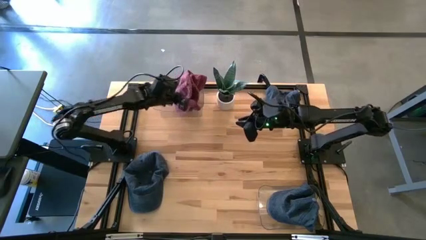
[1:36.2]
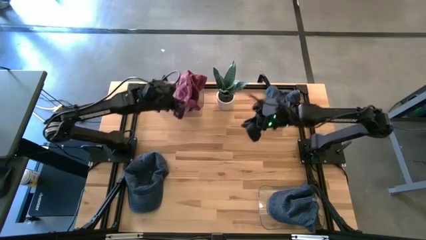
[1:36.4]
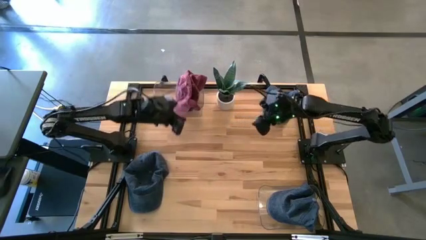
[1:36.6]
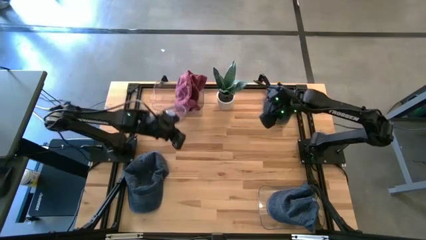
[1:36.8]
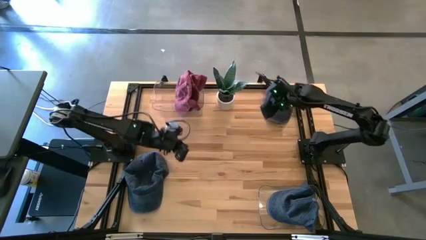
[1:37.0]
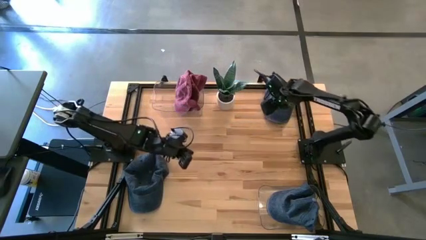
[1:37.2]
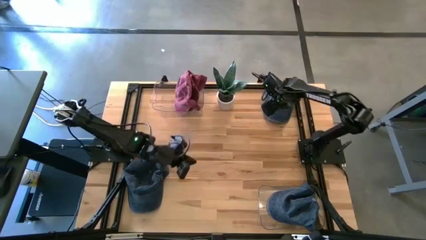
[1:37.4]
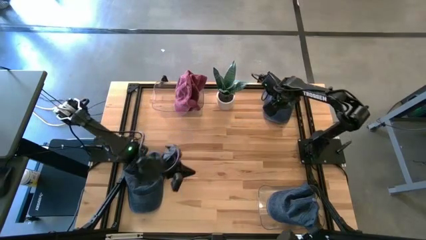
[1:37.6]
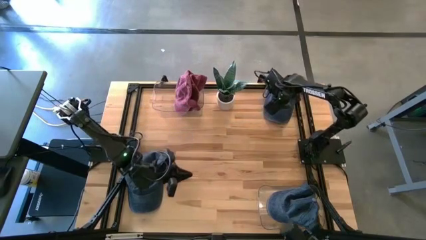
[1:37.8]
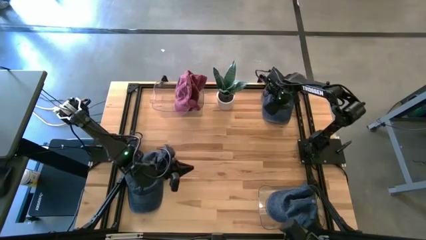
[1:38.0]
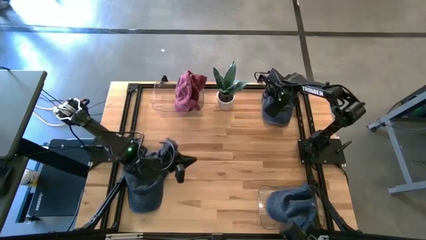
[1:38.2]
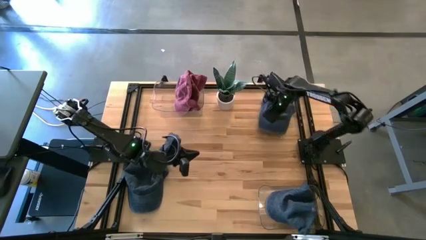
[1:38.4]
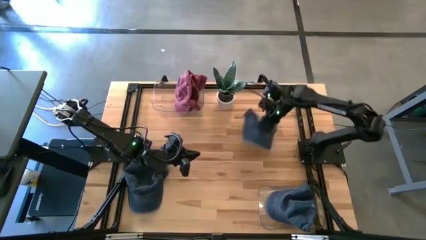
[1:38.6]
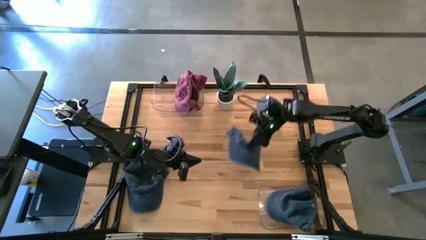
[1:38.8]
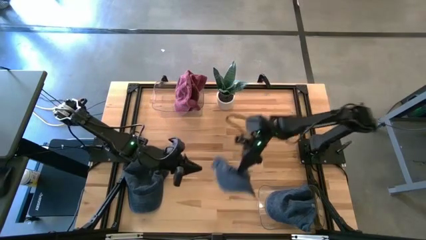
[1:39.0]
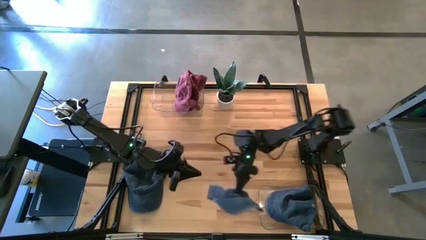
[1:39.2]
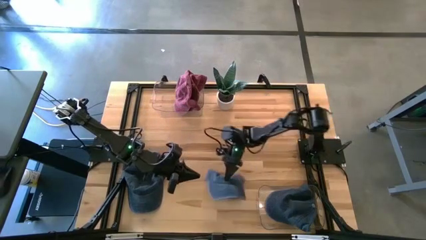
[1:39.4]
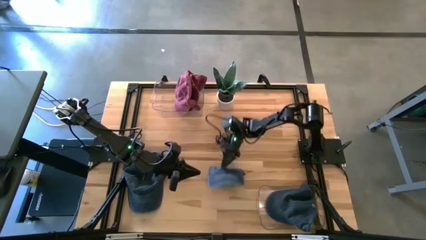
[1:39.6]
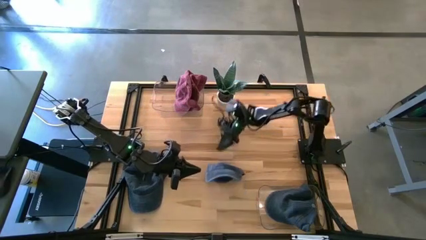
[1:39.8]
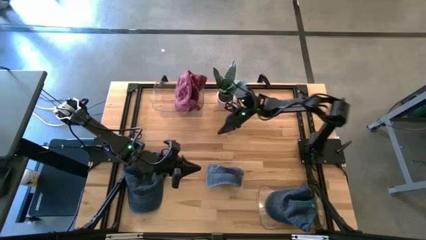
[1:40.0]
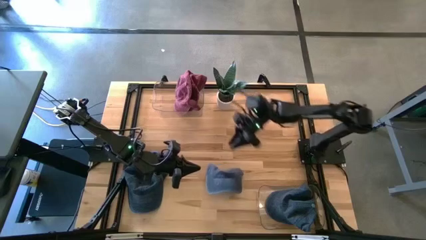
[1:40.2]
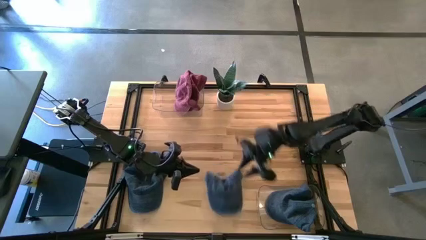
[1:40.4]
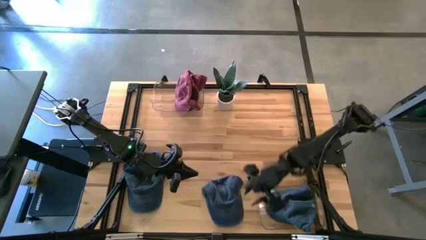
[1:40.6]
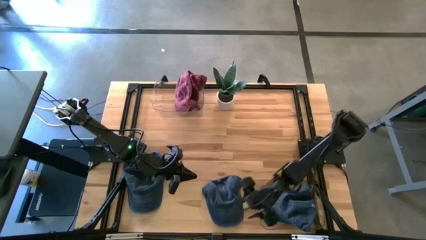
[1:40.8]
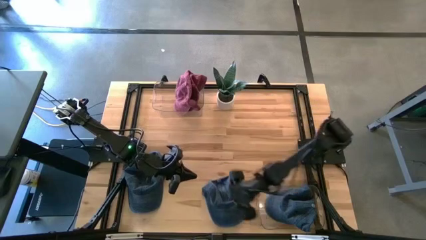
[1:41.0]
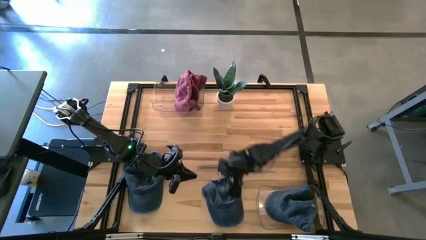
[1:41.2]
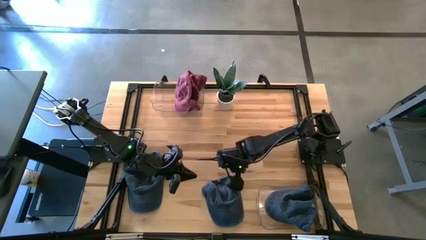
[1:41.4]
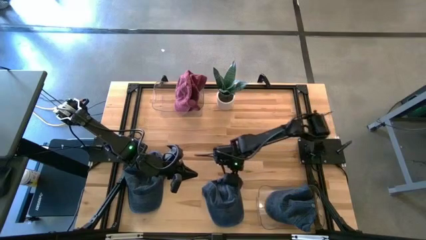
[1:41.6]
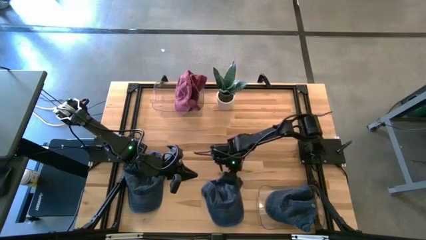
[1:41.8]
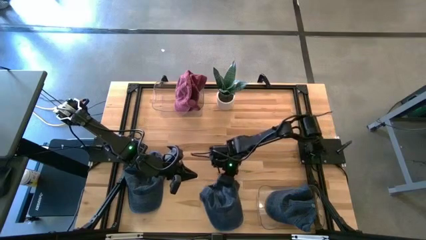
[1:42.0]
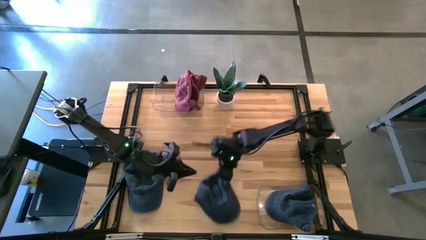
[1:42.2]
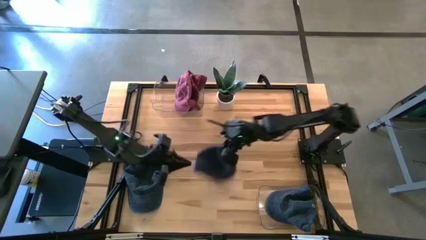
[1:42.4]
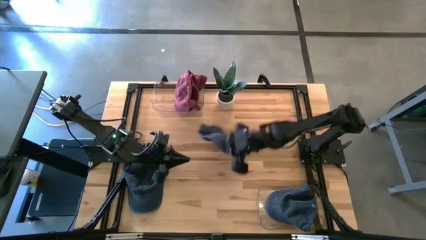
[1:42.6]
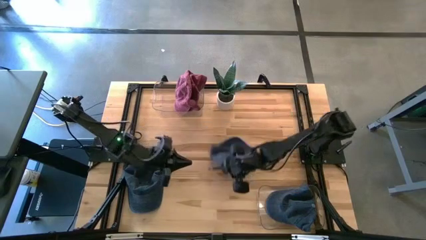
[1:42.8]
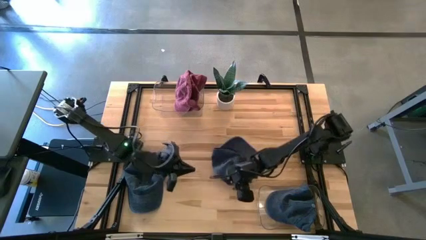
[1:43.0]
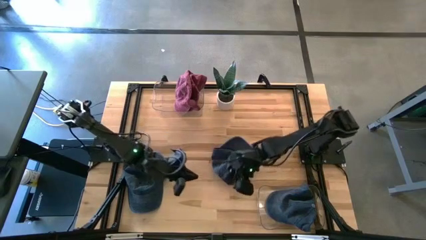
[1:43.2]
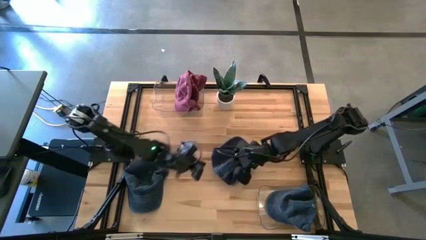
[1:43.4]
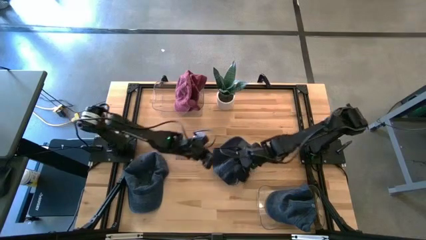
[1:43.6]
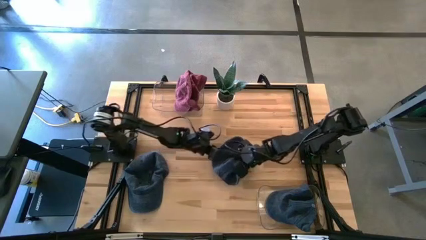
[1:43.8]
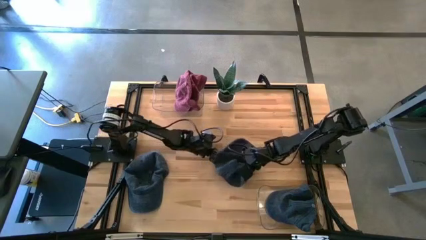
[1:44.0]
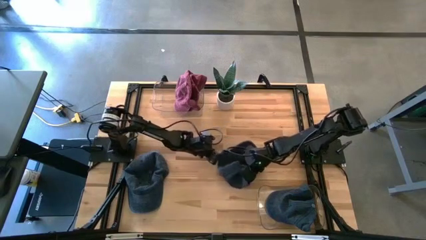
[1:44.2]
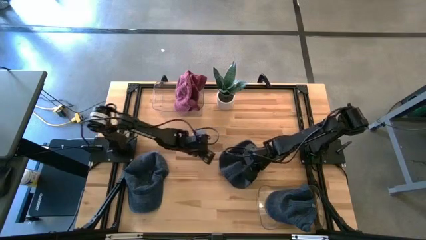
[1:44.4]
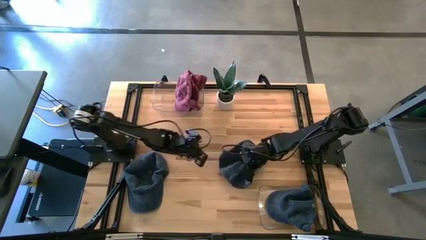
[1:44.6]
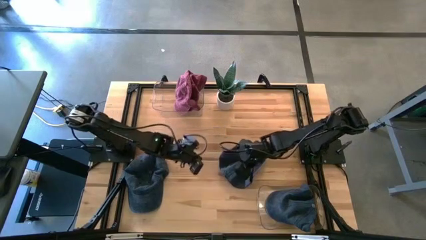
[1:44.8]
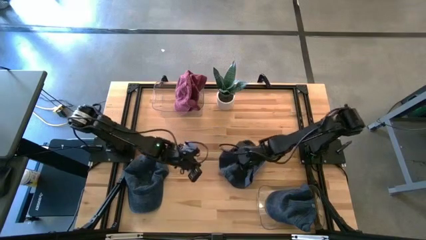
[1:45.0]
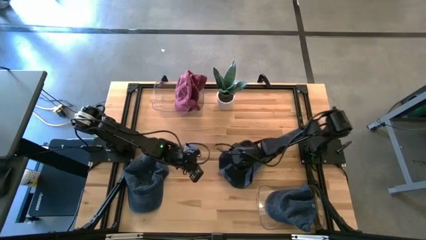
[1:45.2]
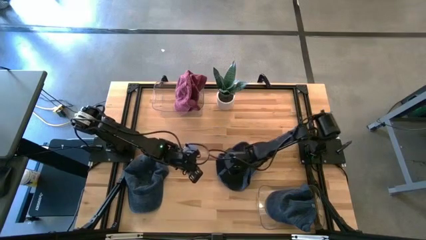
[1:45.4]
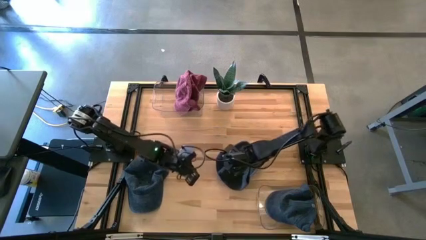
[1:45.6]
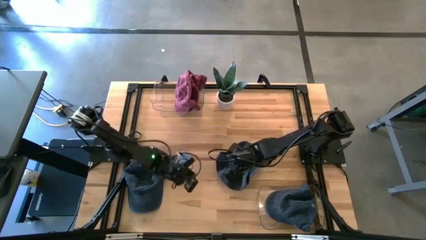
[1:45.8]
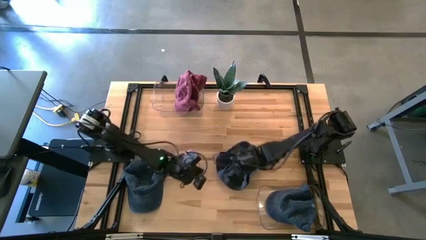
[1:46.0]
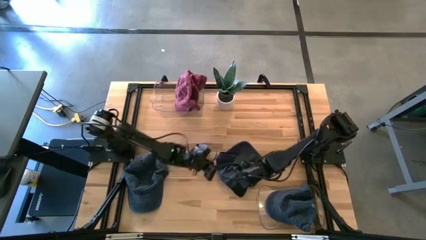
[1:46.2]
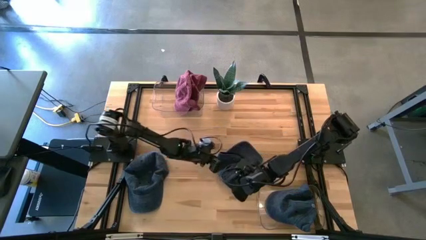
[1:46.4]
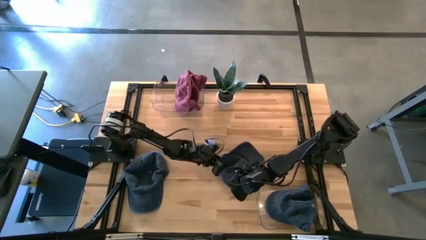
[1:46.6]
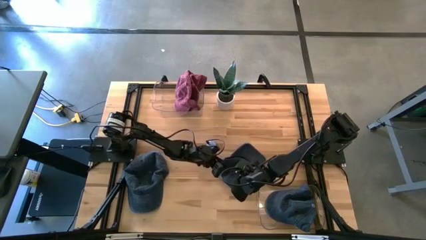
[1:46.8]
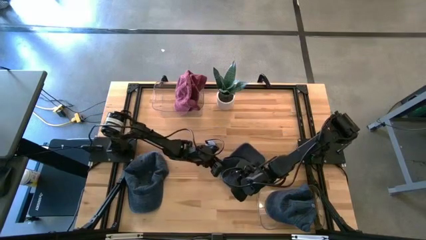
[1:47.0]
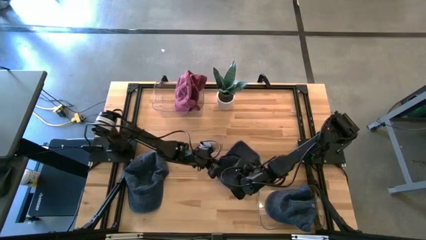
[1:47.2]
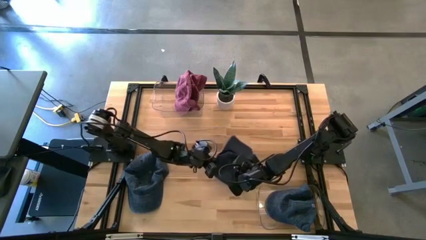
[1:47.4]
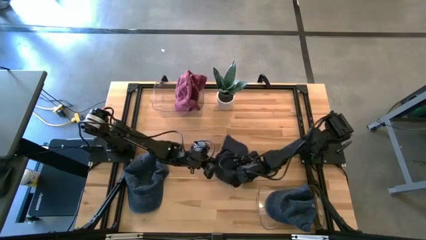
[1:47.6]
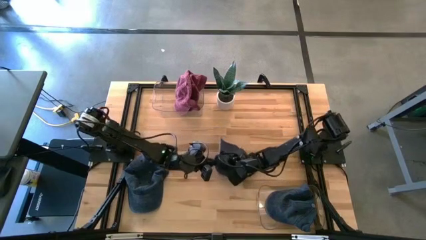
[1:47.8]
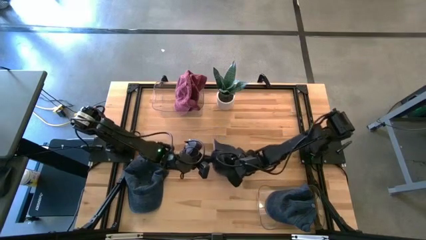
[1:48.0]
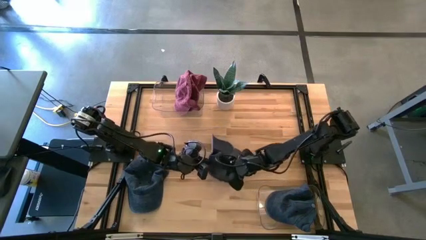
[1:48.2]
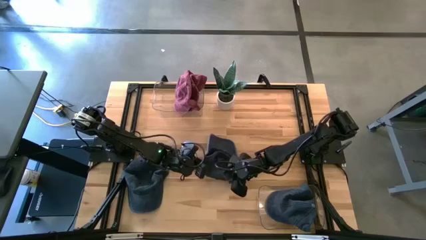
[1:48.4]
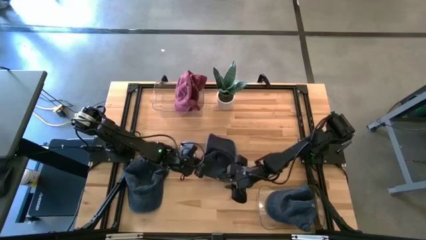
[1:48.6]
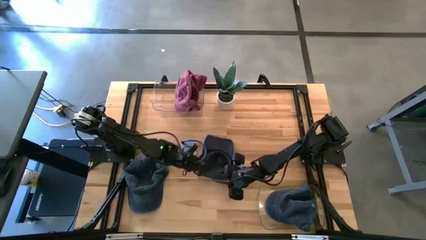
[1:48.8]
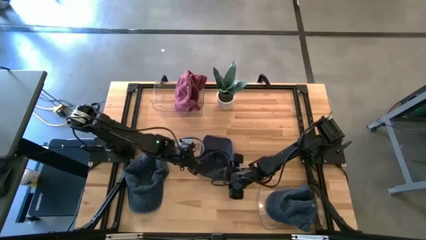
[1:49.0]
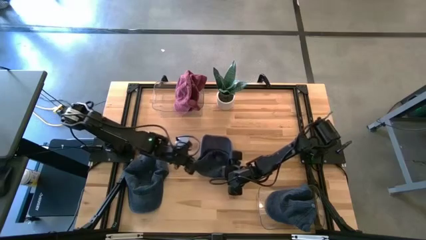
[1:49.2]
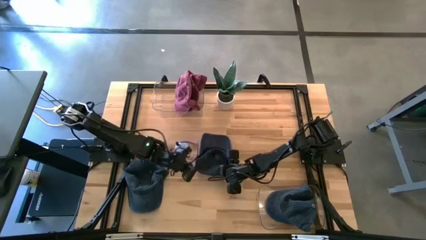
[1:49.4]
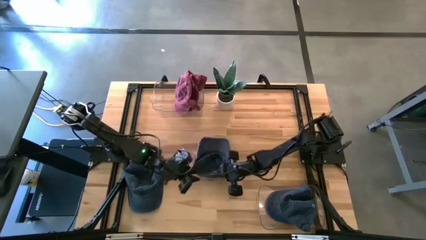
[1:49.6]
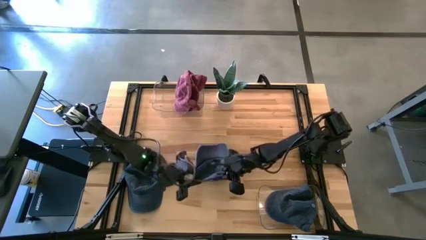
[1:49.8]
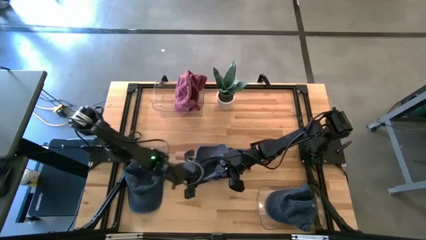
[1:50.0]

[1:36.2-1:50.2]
Task: Pick & Place hat
Put the top blue cap into the bottom transparent bin

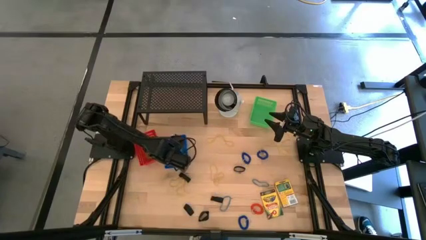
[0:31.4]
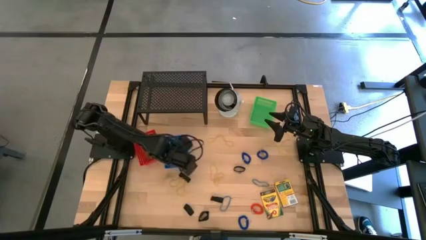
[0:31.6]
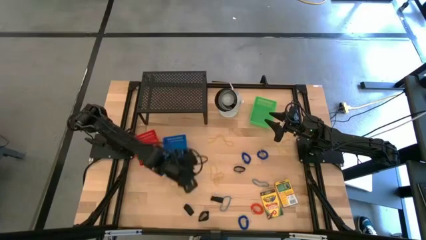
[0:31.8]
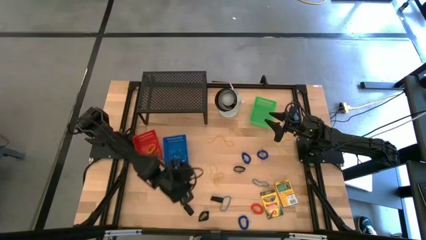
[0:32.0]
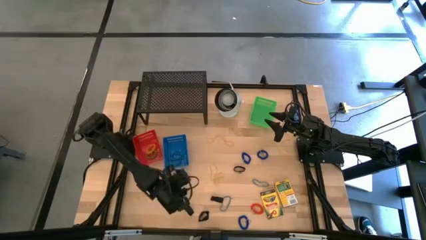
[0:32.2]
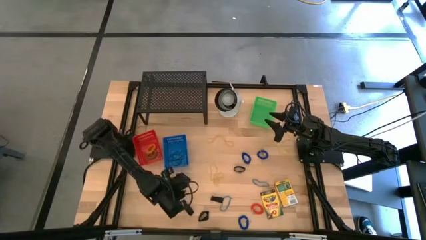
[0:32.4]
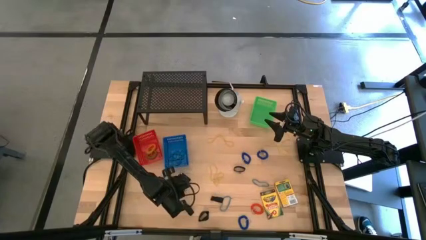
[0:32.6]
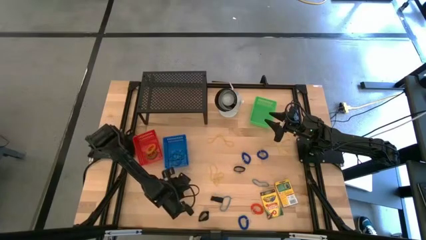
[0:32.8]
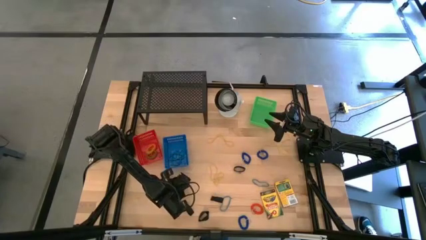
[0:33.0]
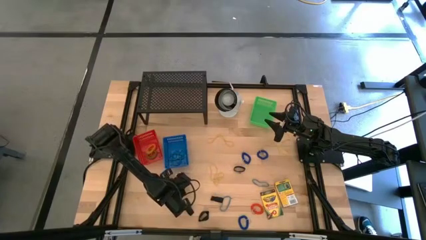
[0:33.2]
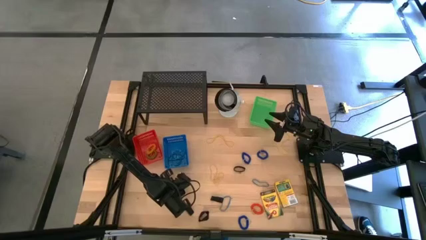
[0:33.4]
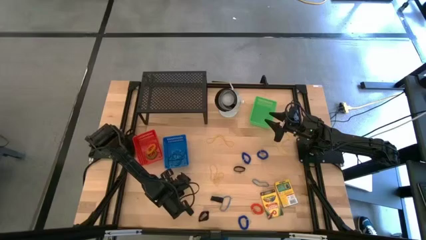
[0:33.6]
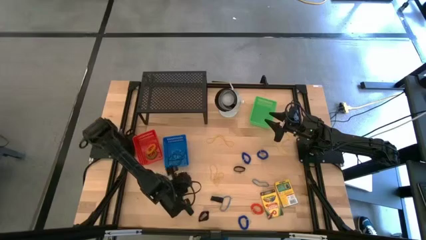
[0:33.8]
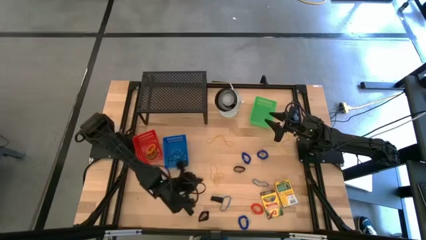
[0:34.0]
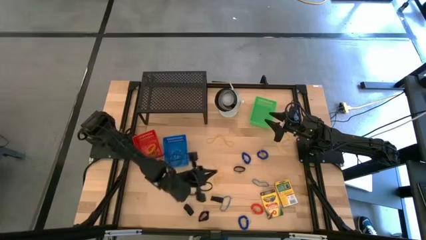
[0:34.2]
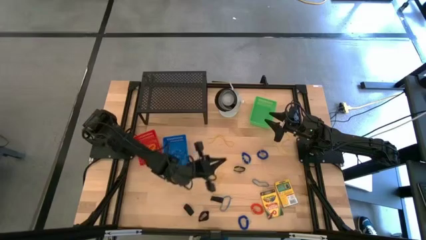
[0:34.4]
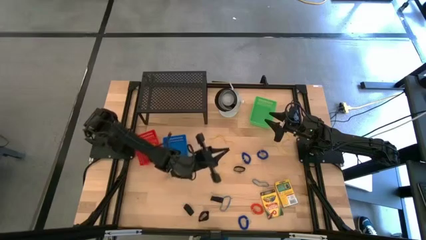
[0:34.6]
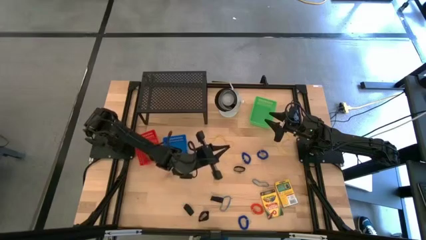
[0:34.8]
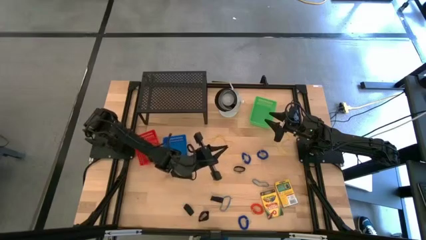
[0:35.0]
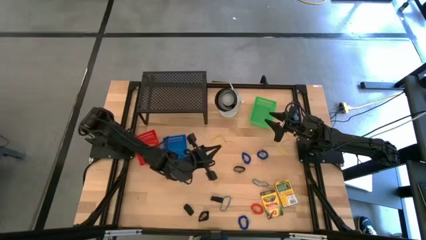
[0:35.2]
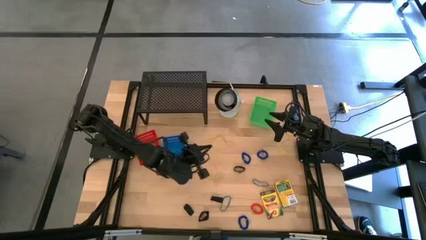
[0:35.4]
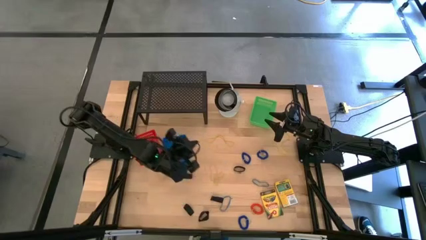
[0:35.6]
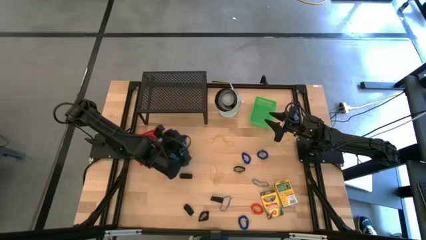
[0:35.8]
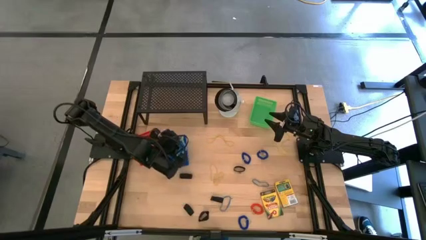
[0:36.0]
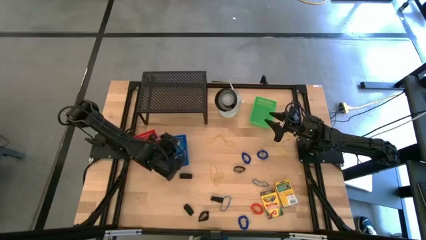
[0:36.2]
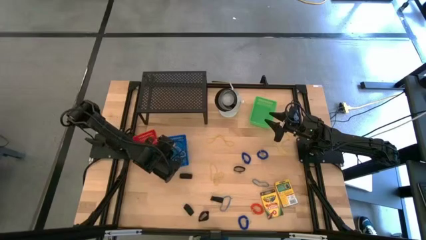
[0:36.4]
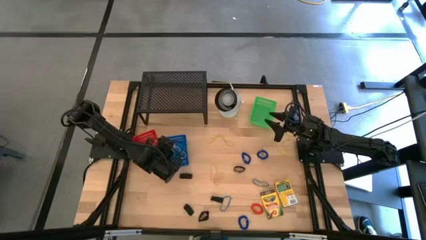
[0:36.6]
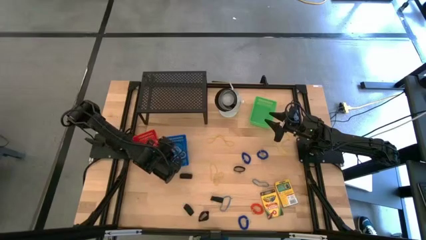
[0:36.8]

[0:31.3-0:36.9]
Task: Pick & Place Office Desk Supplies
Put the yellow rubber band into the blue bin
